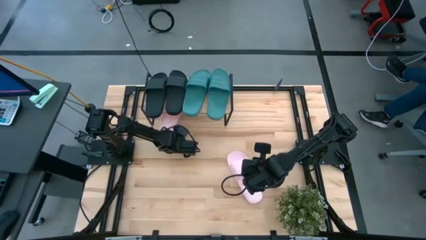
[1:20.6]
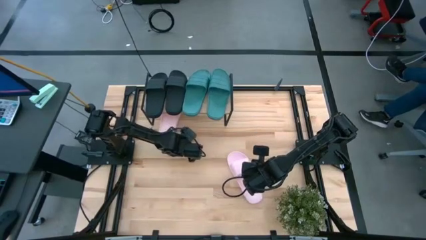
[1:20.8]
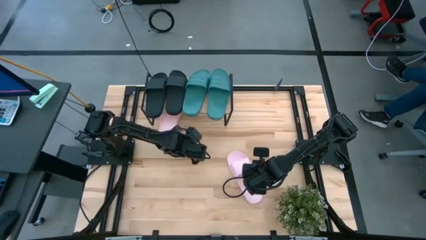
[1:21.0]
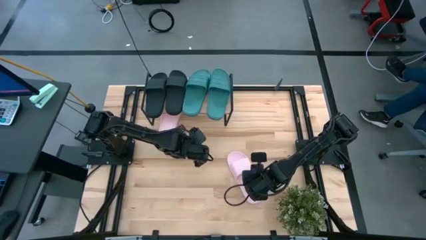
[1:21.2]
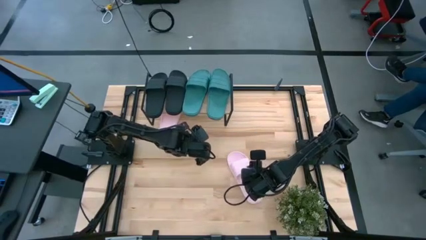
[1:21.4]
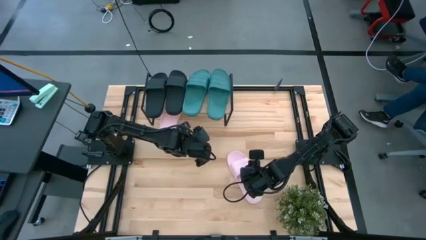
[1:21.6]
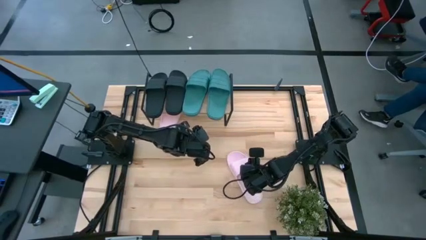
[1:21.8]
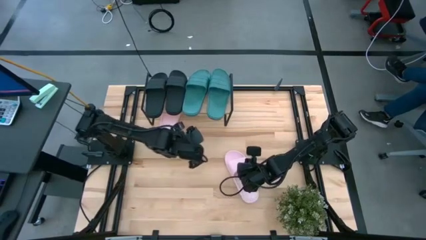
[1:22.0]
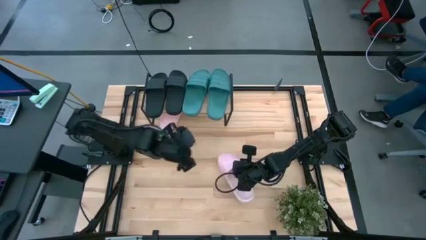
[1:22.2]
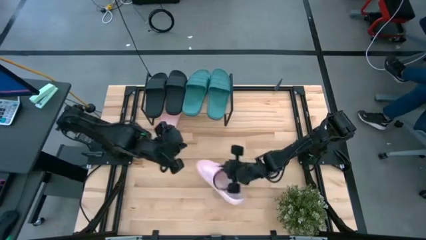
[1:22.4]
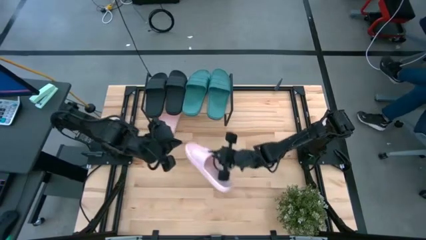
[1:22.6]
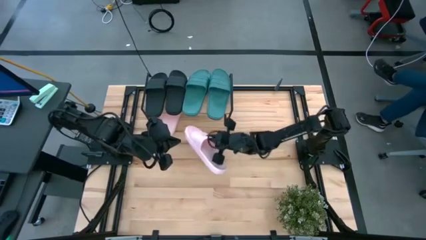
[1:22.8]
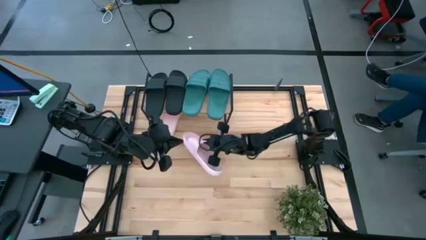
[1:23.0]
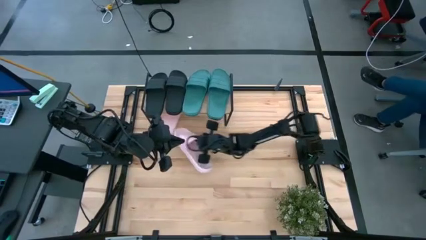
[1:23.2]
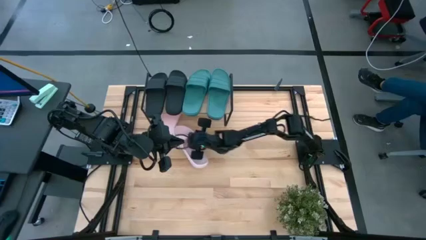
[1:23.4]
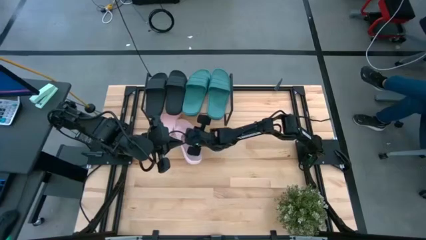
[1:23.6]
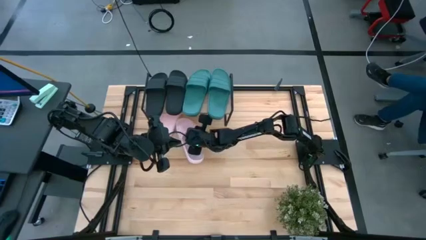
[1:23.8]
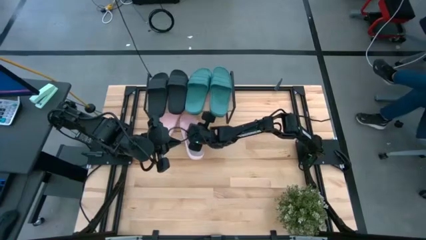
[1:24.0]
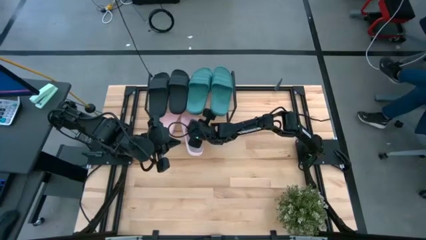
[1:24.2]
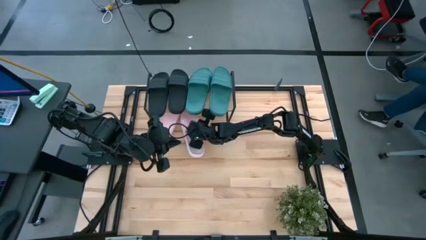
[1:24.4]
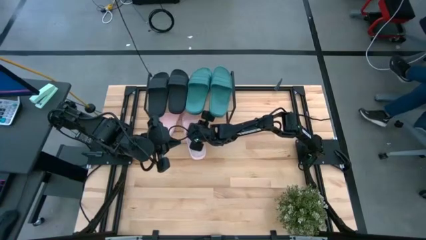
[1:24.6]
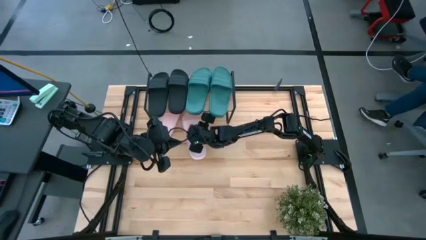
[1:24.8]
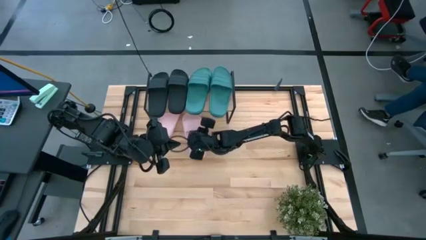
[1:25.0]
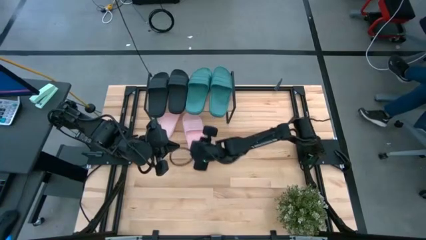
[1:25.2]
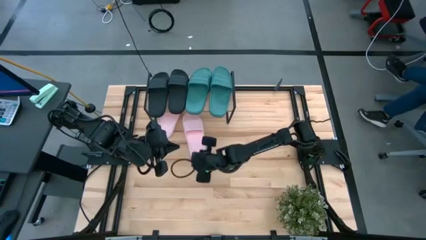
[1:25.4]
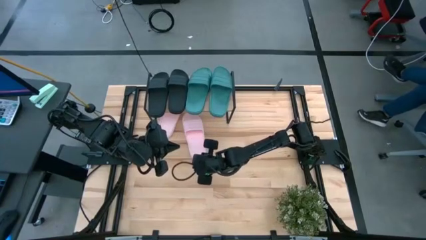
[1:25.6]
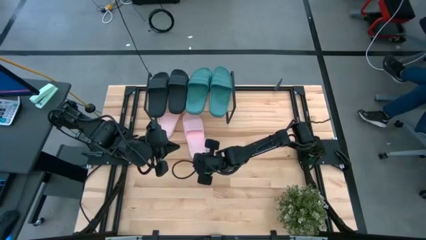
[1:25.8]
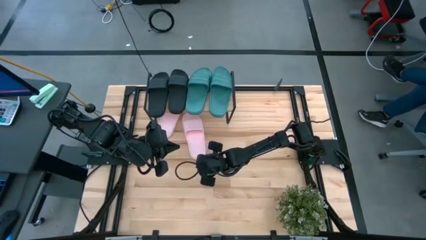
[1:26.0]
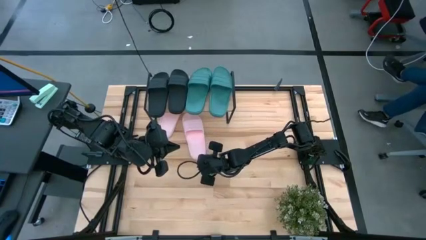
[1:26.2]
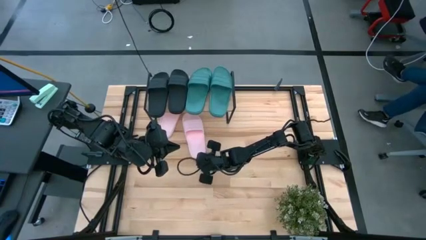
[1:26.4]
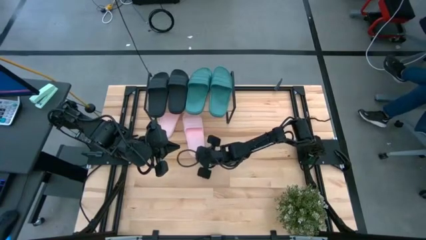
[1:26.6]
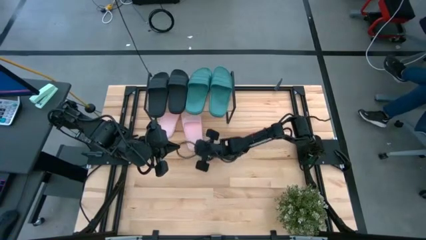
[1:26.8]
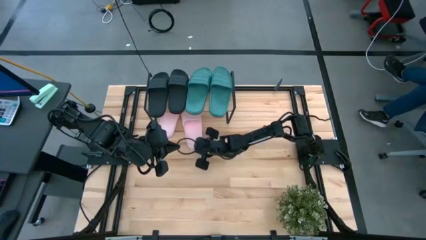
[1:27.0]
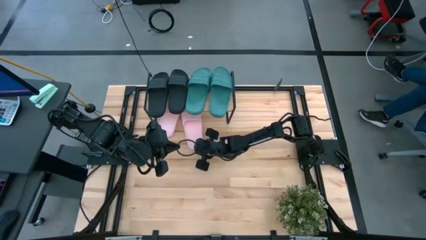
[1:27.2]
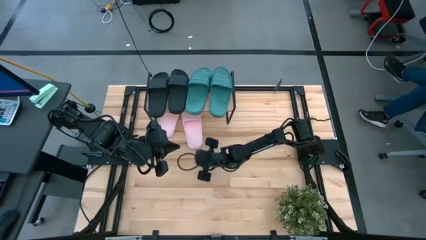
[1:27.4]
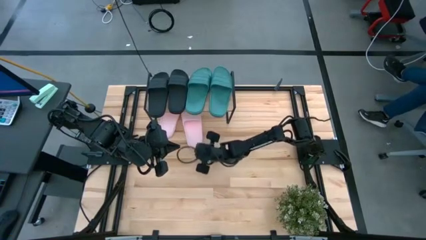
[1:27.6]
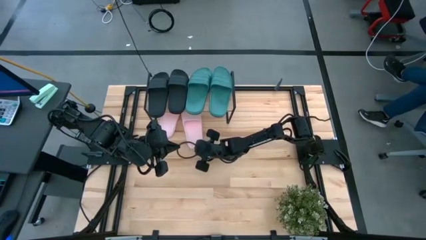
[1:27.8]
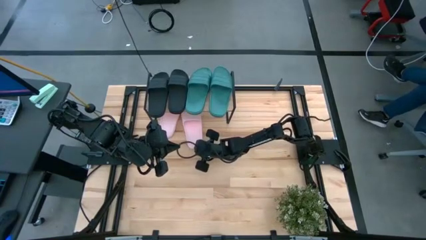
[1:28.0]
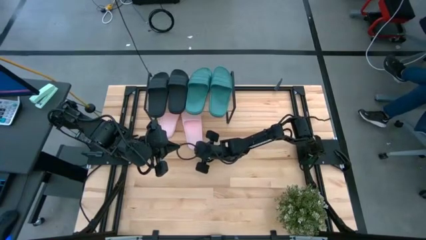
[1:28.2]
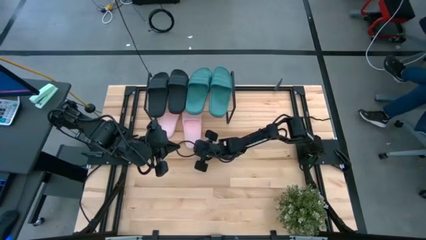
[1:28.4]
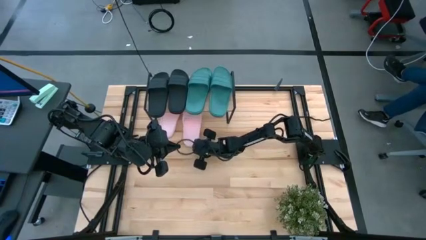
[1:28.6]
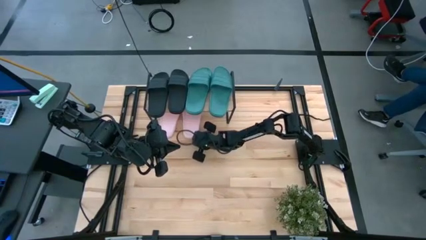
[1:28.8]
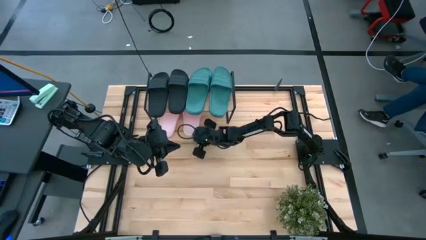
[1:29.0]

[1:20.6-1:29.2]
Task: Pick and place slides into the shelf
Move the pink slipper under the shelf

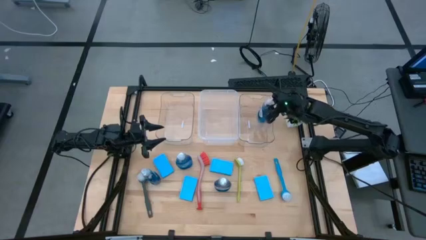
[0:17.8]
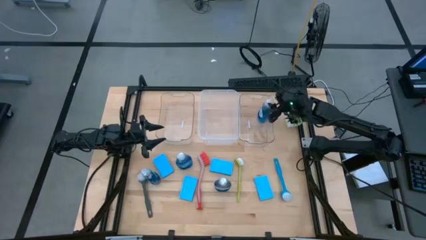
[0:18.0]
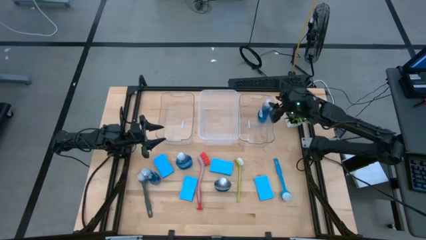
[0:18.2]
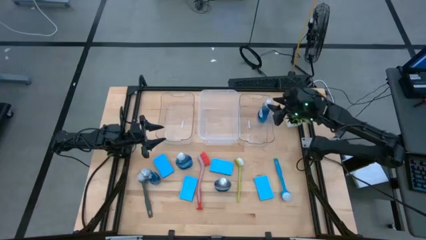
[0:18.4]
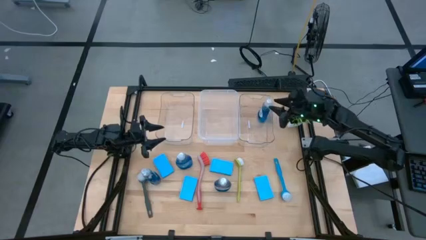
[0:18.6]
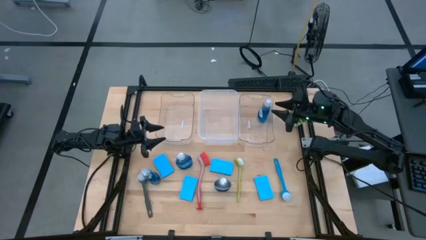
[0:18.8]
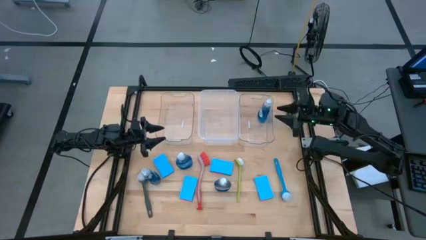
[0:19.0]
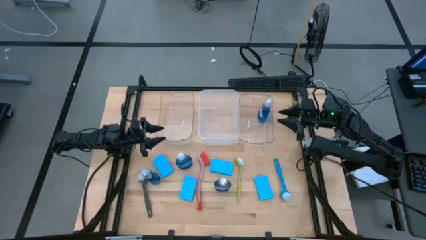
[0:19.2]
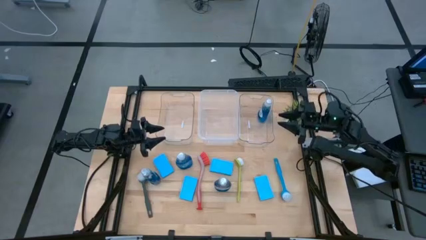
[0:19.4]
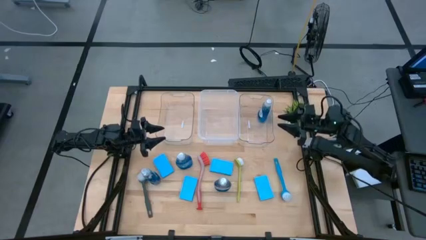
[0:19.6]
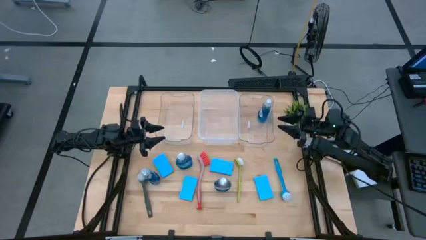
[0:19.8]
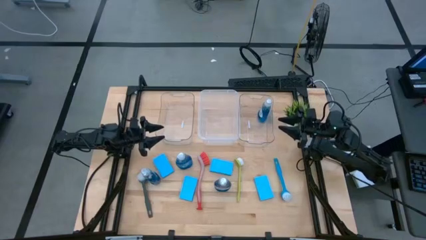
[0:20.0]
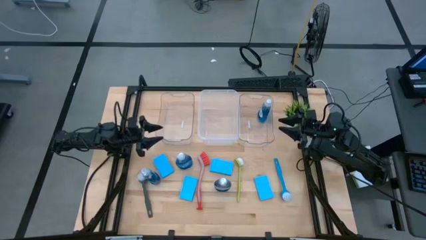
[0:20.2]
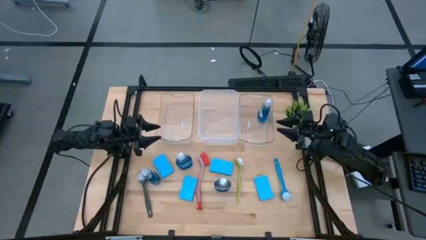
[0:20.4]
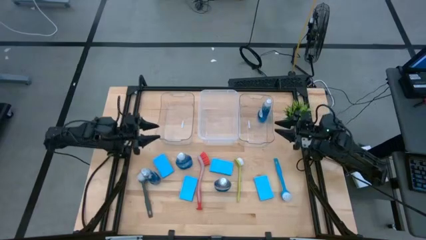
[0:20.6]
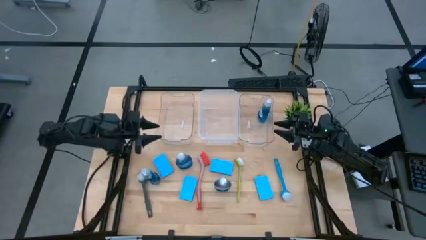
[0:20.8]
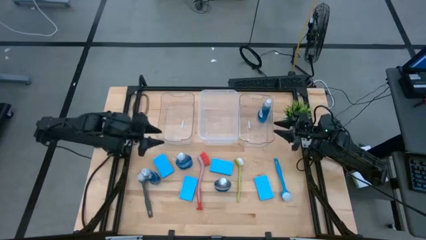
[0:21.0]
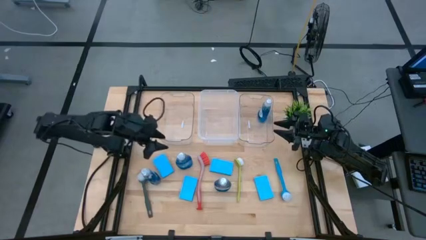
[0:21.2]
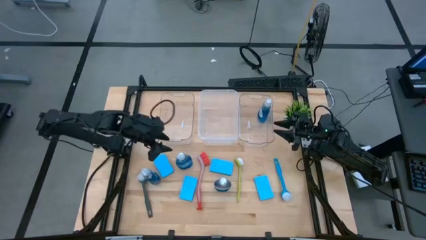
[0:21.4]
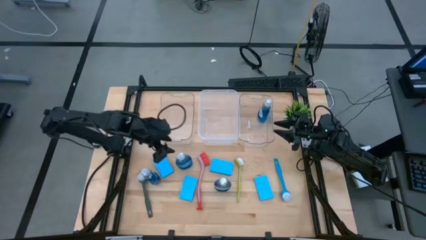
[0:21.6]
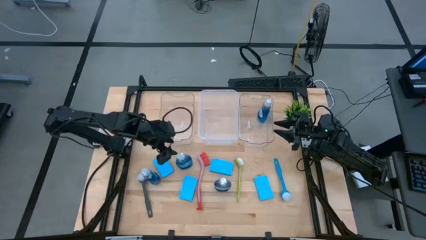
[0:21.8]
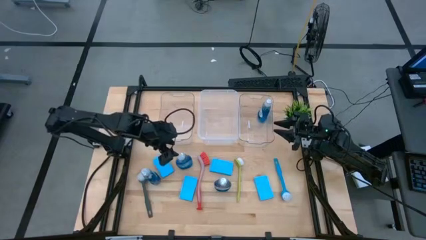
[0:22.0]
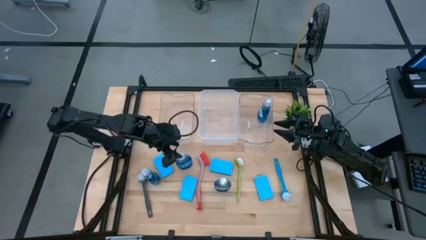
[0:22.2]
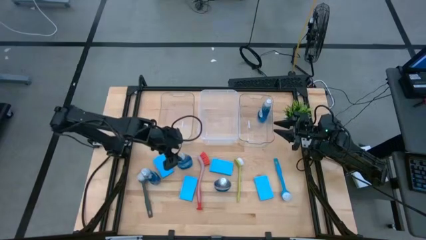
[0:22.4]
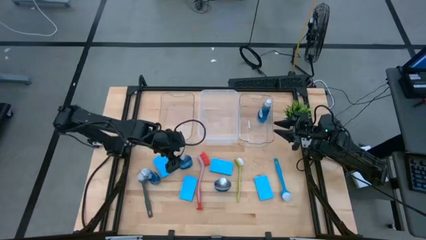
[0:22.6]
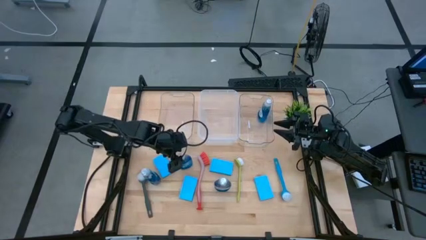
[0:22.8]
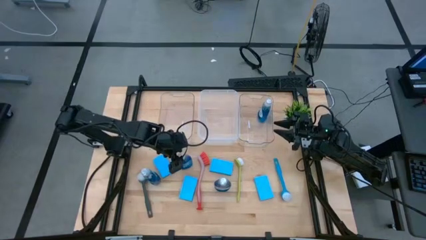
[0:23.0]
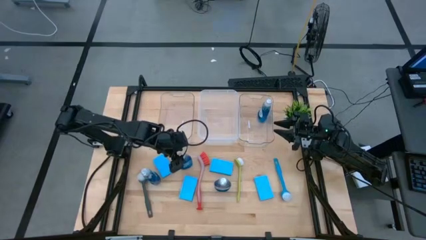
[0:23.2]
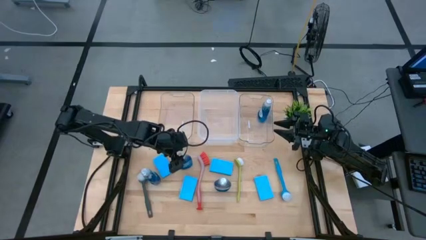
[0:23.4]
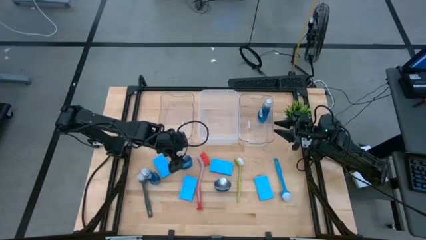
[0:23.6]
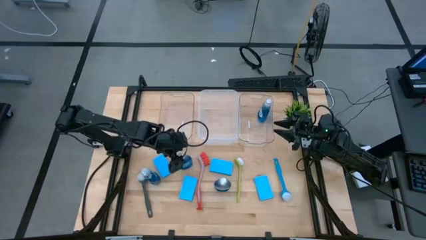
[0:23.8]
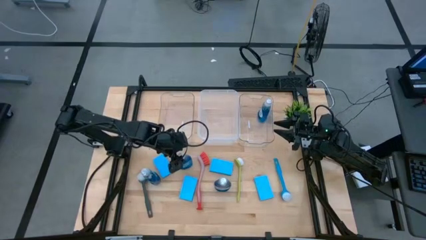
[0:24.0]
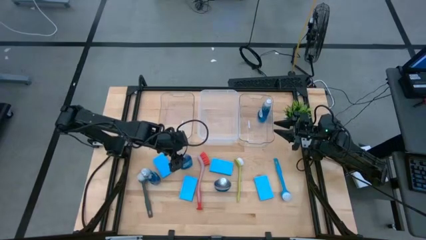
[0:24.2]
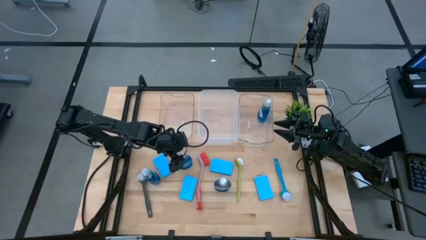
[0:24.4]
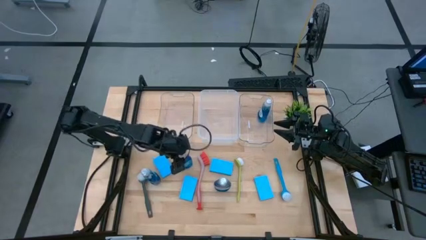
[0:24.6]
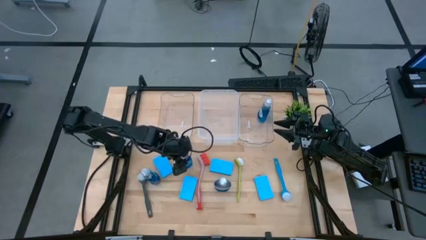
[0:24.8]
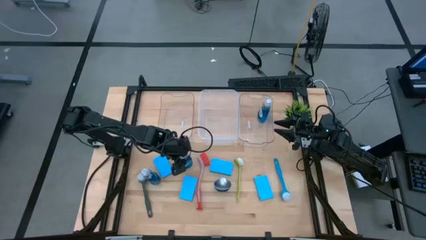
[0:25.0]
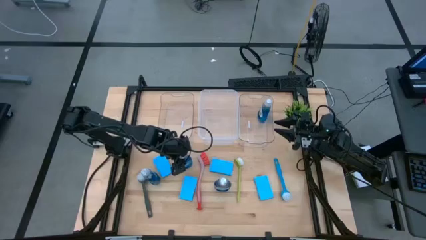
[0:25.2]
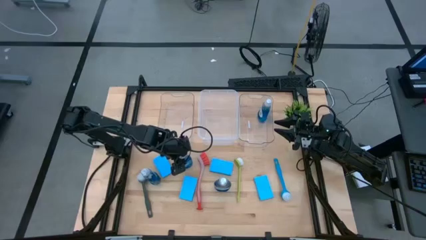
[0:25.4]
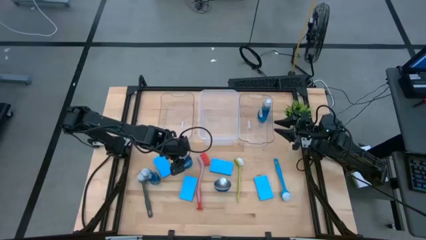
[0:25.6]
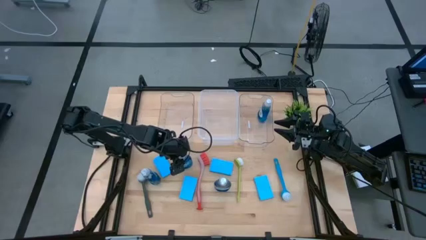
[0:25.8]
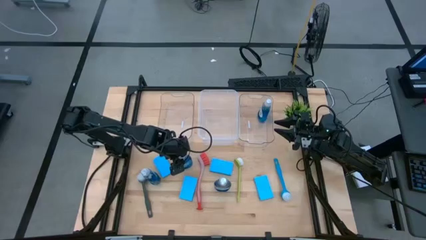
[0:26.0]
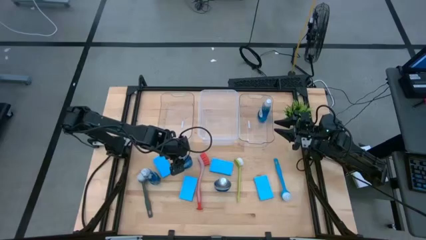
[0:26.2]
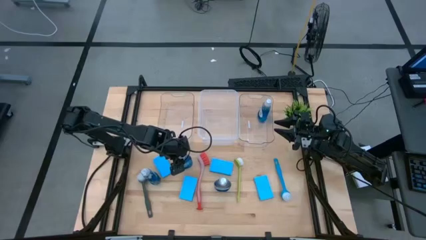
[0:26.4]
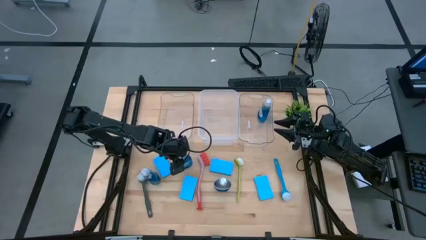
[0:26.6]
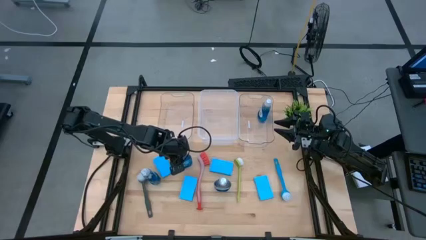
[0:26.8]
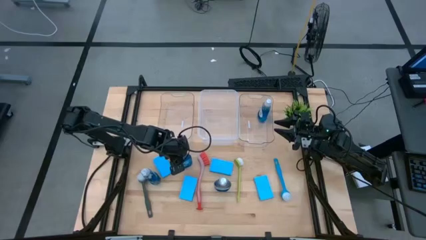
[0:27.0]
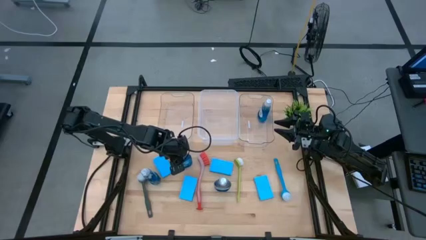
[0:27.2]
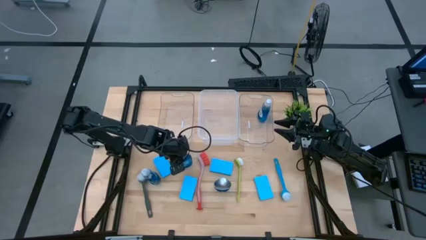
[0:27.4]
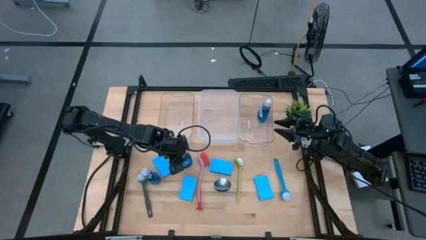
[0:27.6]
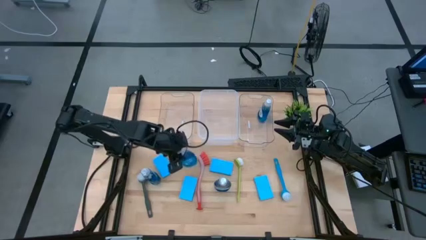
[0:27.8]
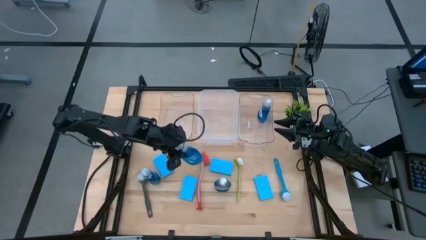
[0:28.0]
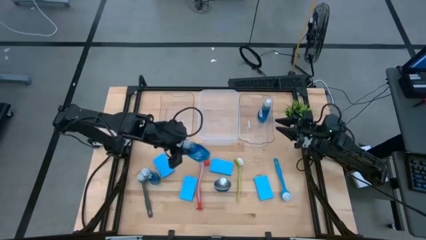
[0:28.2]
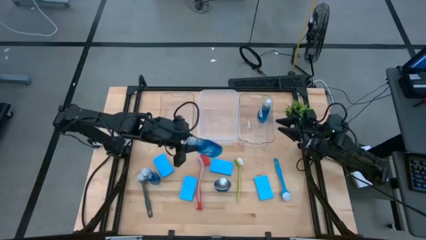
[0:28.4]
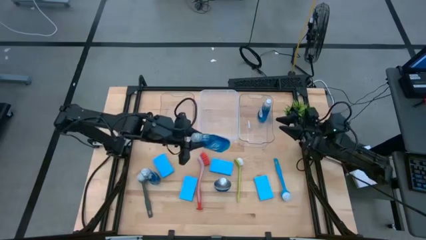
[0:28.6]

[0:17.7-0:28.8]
Task: Pick & Place Kitchen Sink Supplies
Put the dishwashing liquid into the right transparent bin
